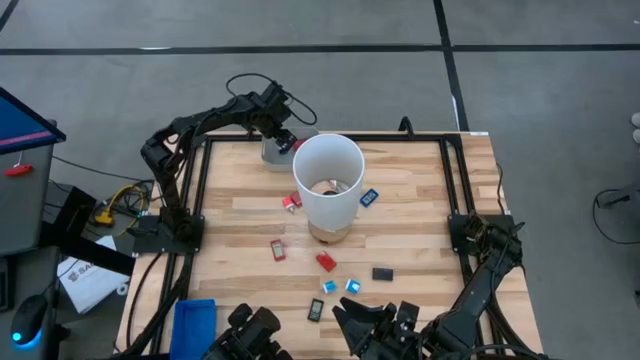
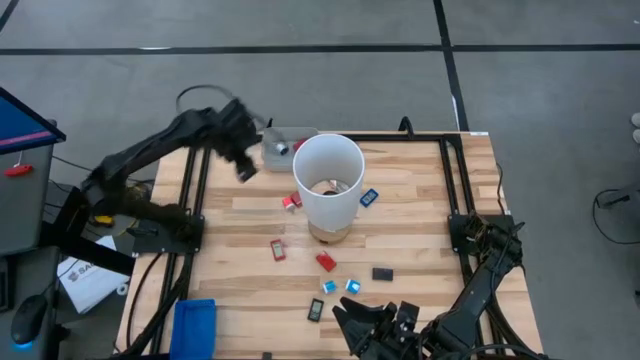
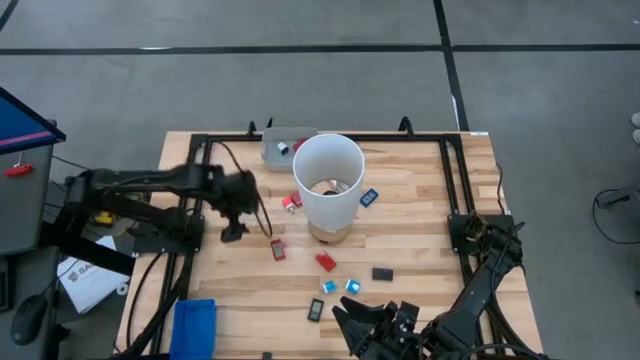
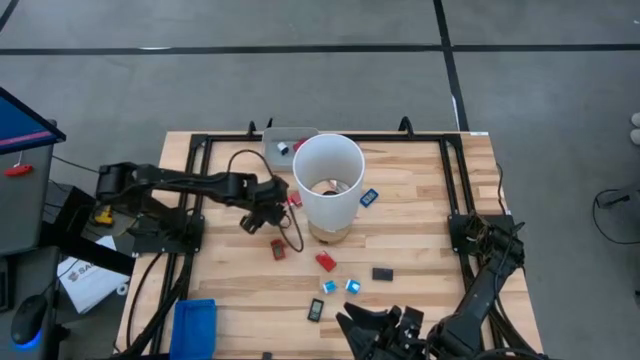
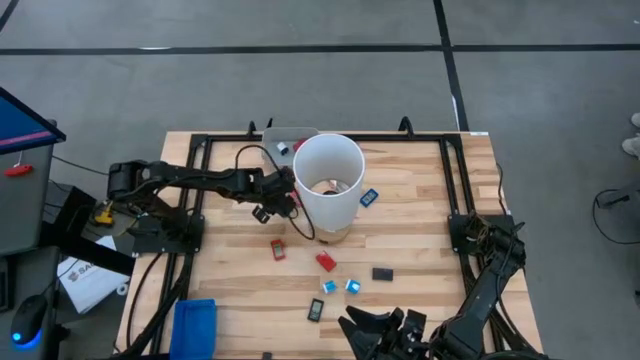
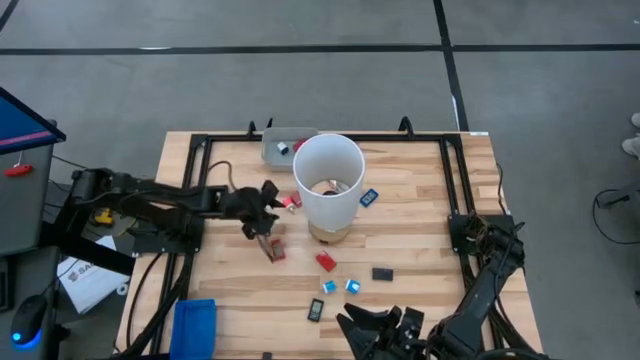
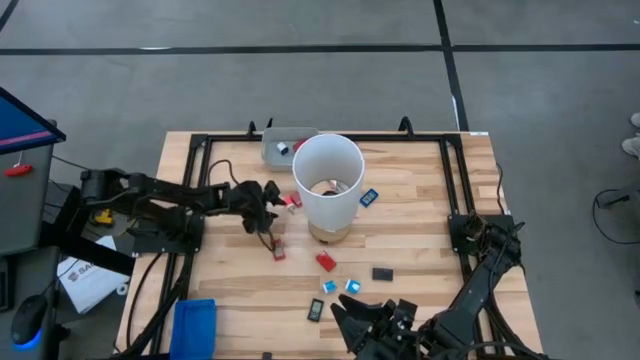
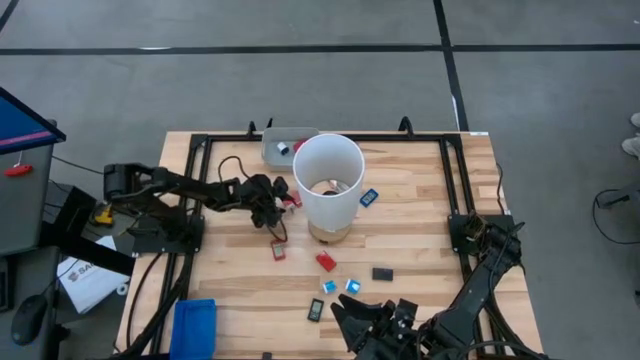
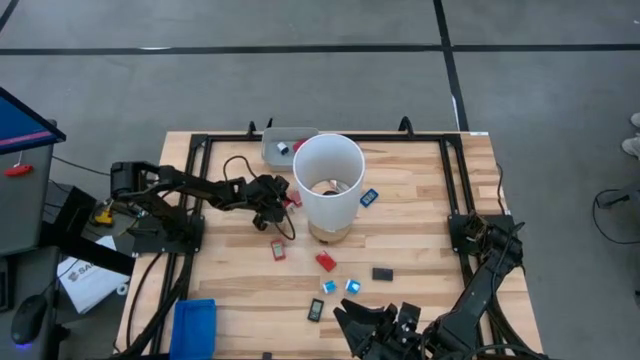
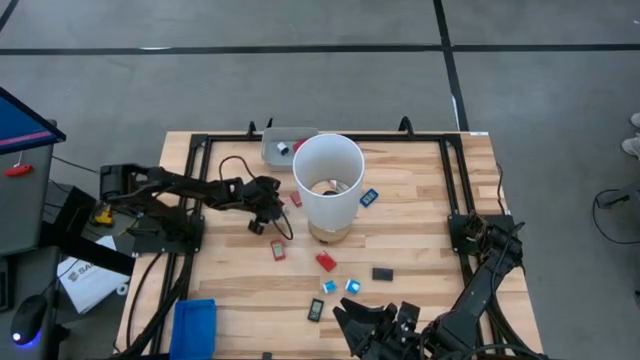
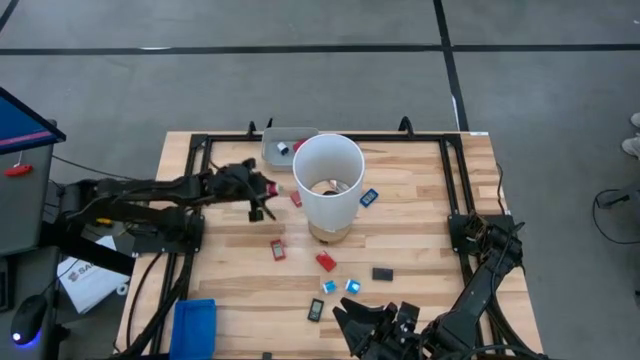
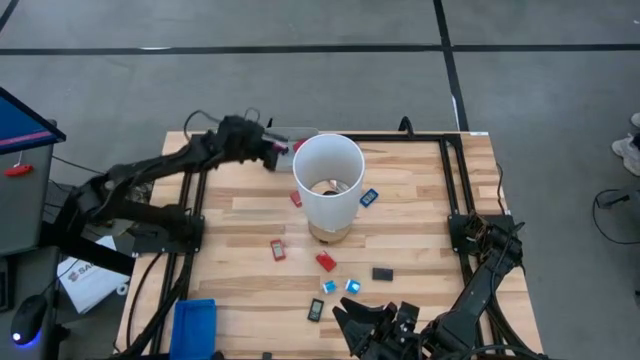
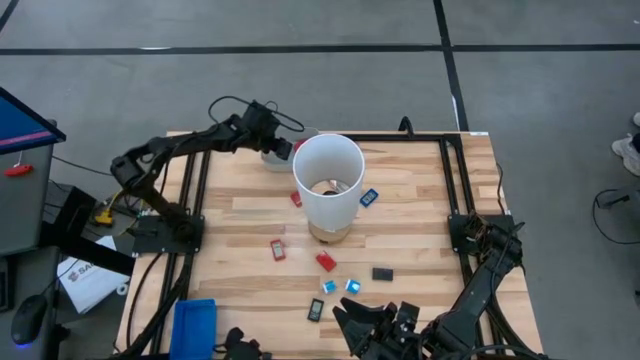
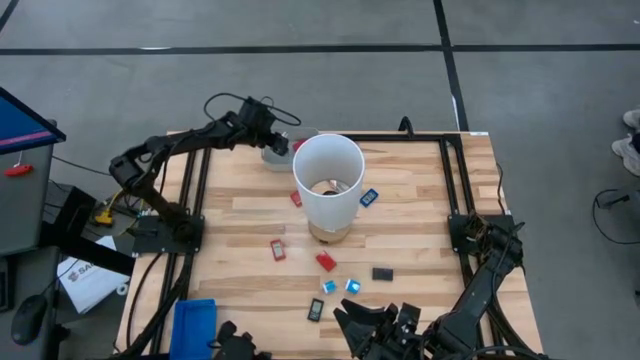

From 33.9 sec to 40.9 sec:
Task: Pick & Place Office items
Put the pink charger adapter into the gray bin

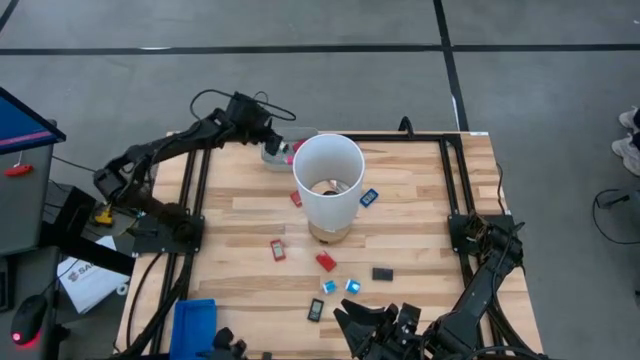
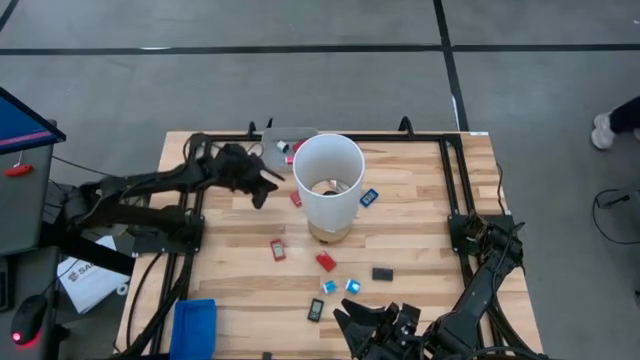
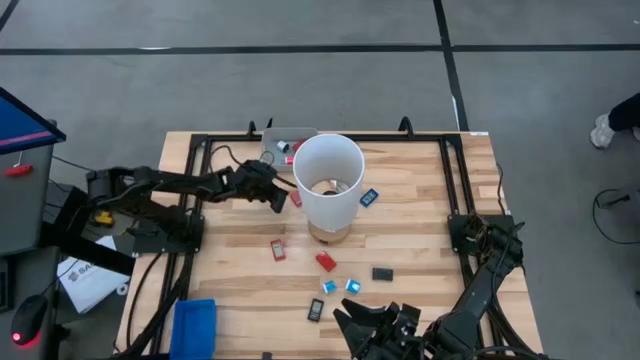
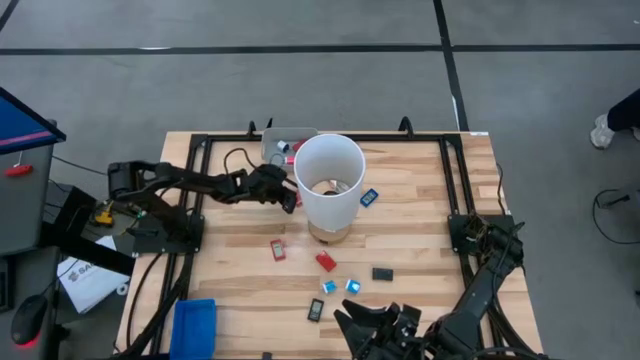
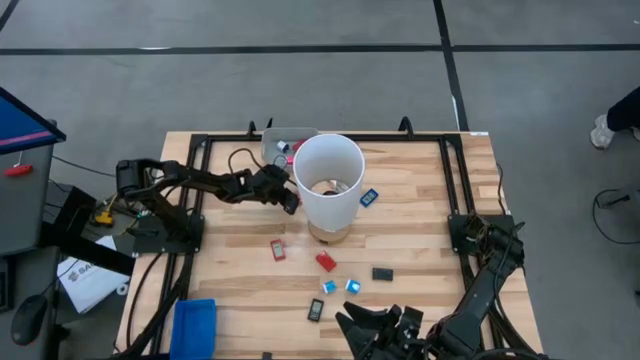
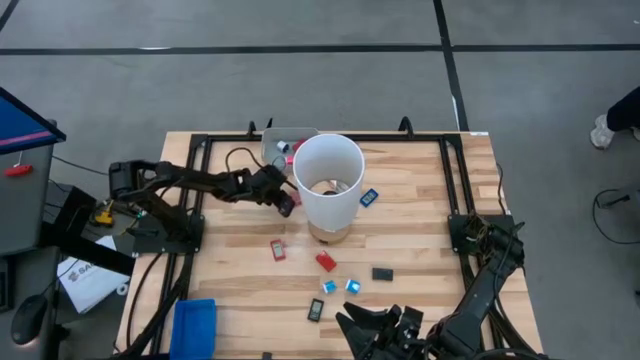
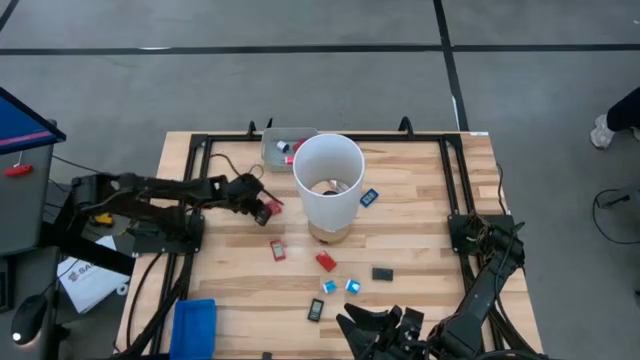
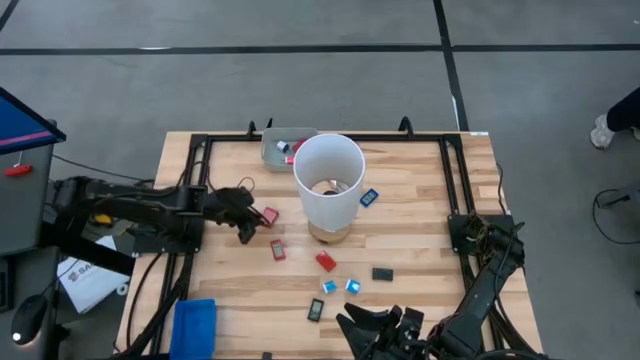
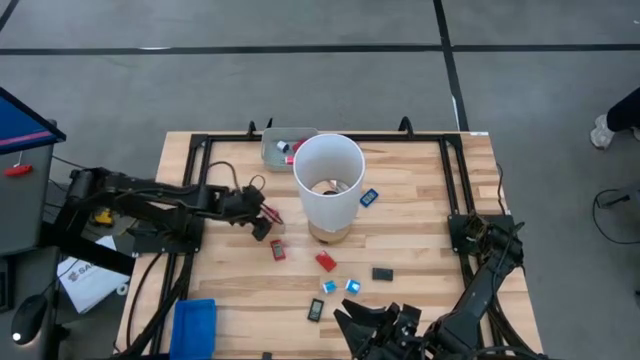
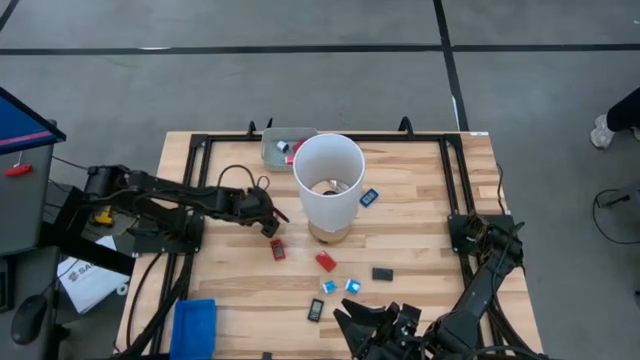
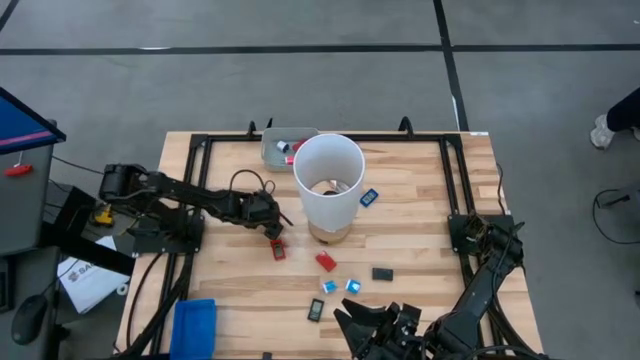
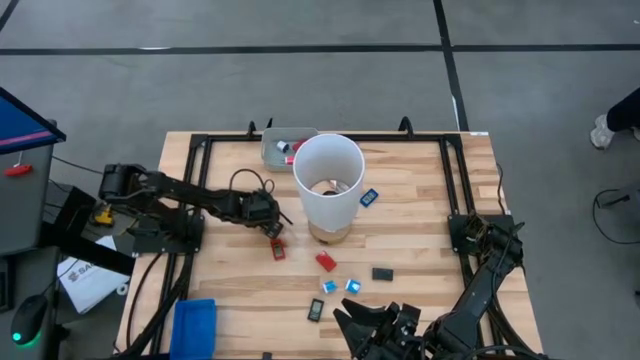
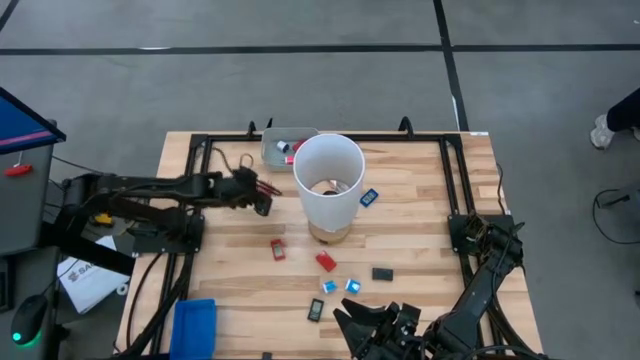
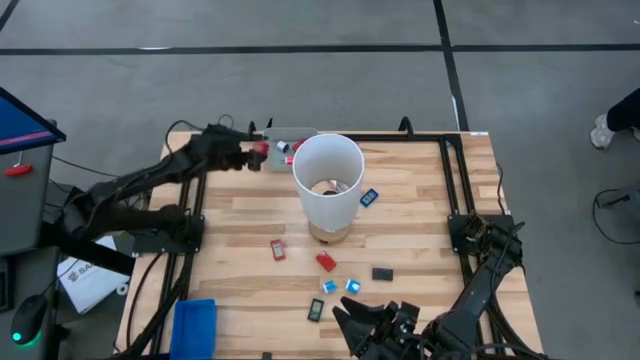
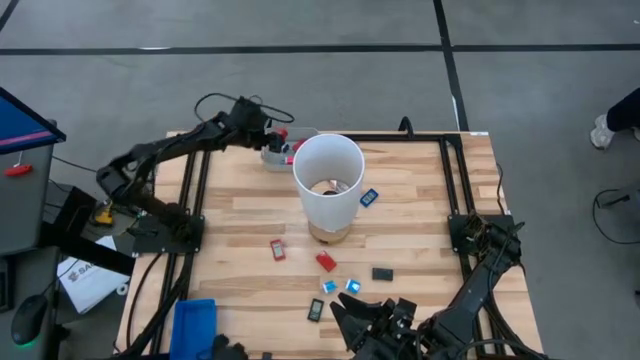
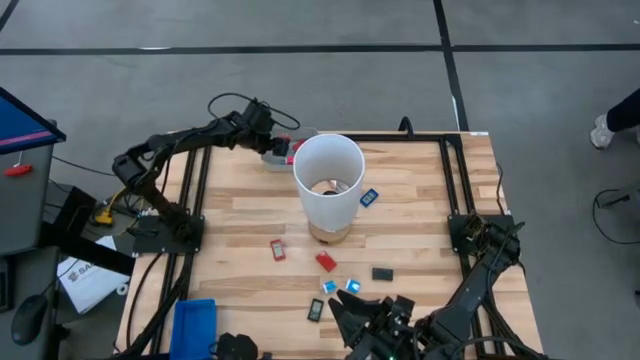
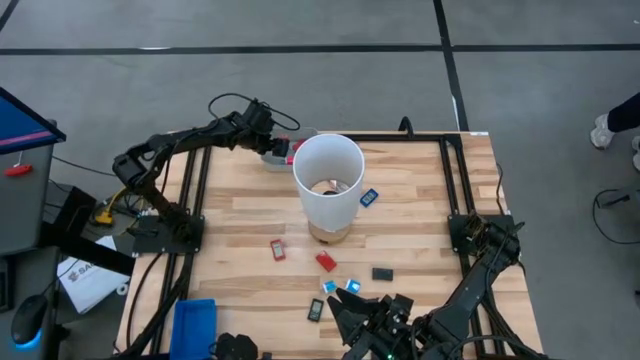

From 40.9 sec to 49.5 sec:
Put the red charger adapter into the gray bin

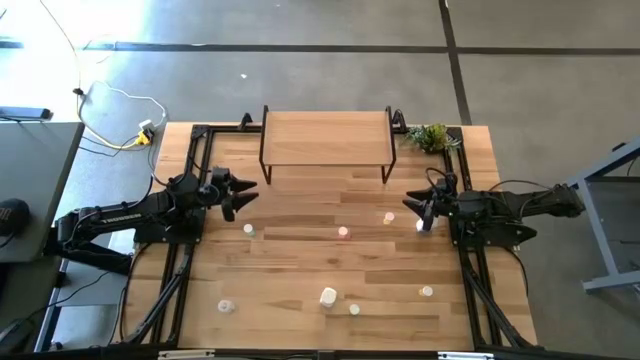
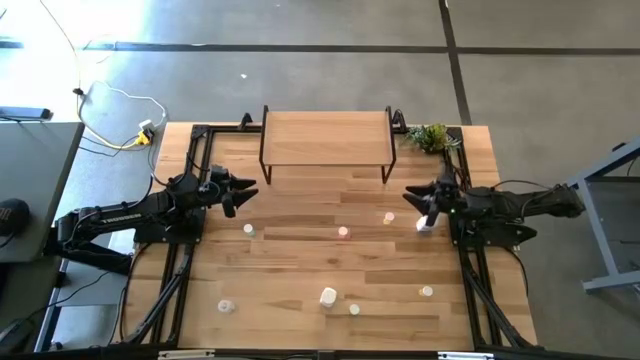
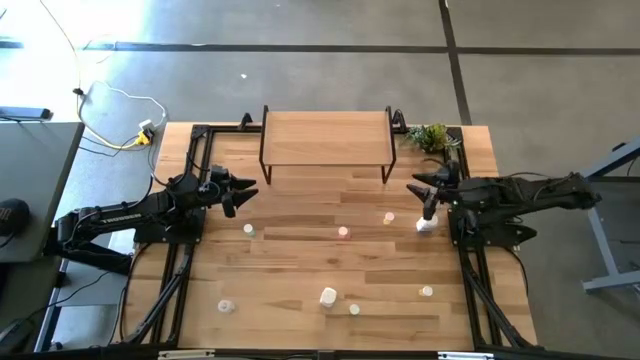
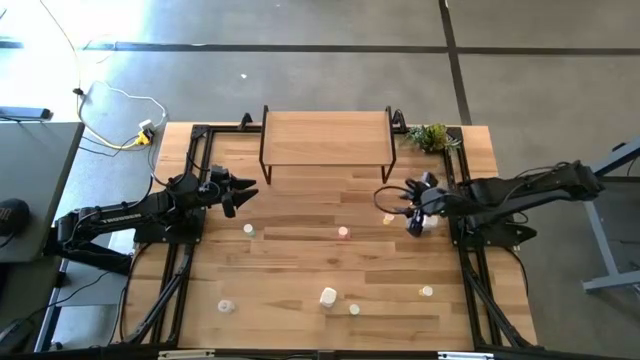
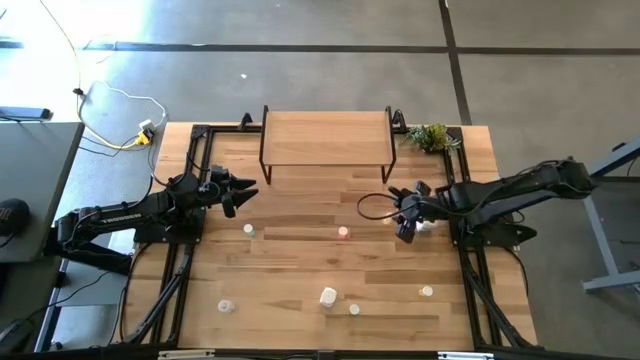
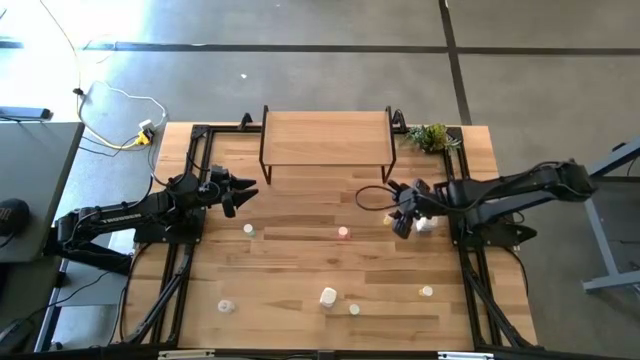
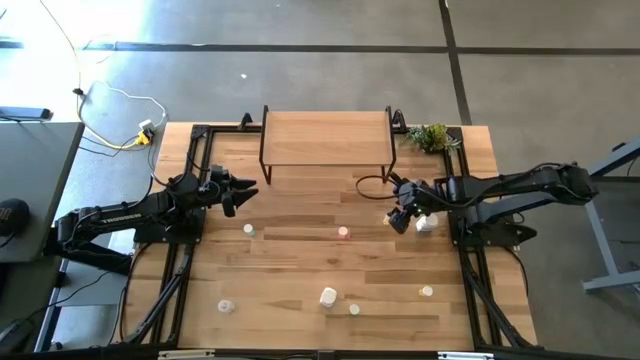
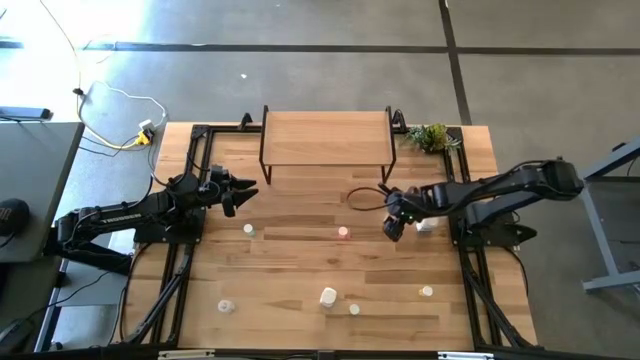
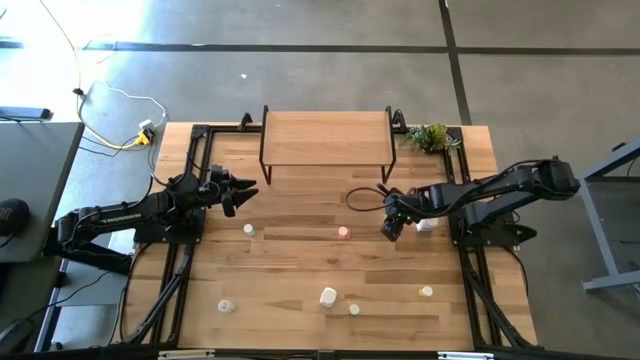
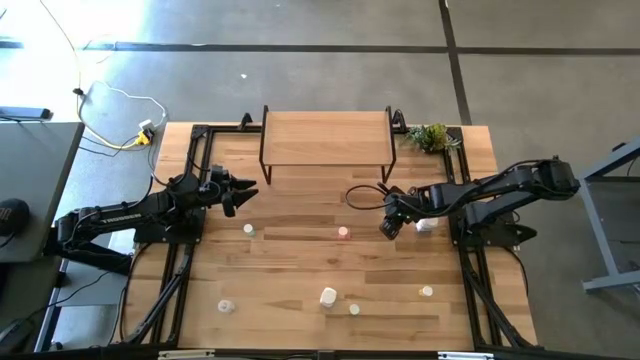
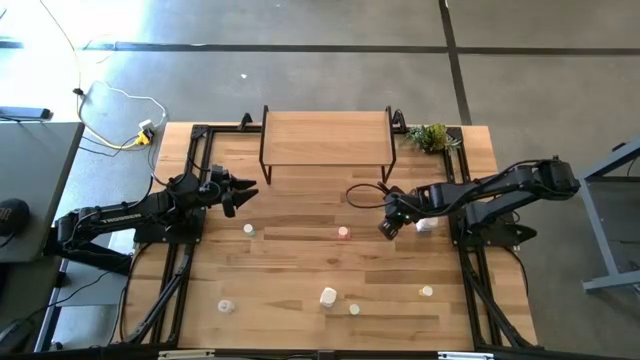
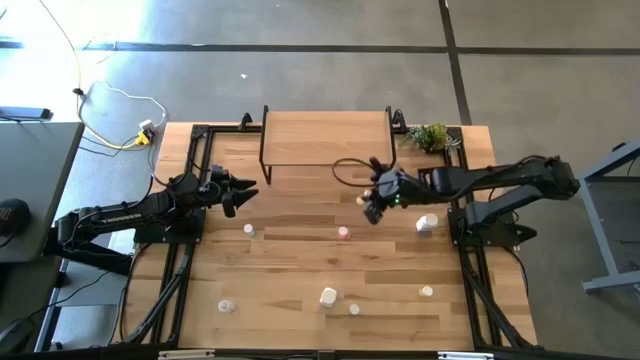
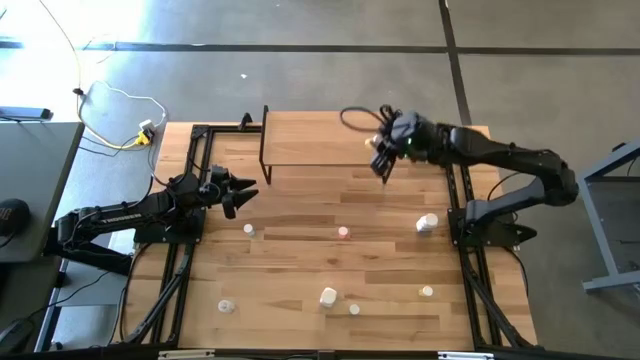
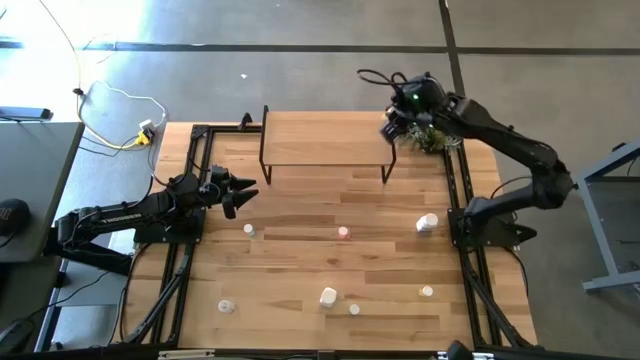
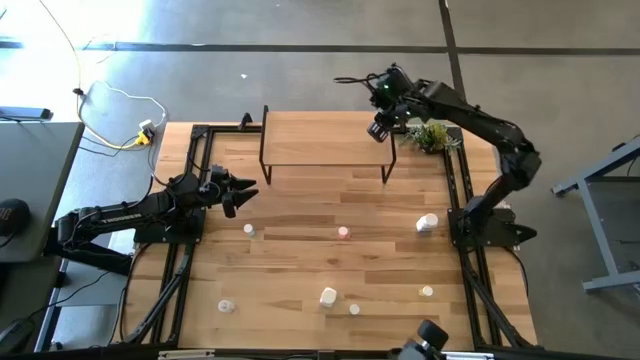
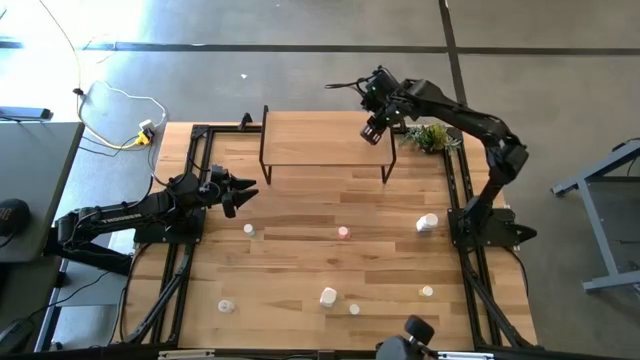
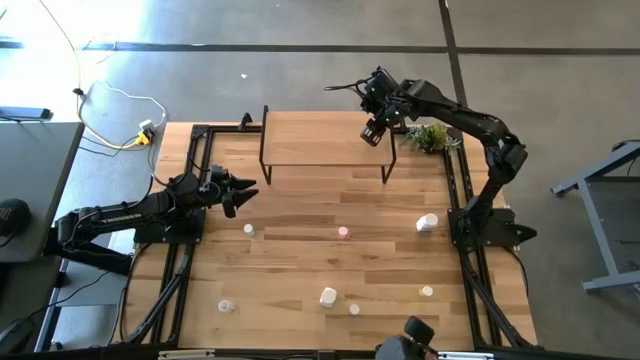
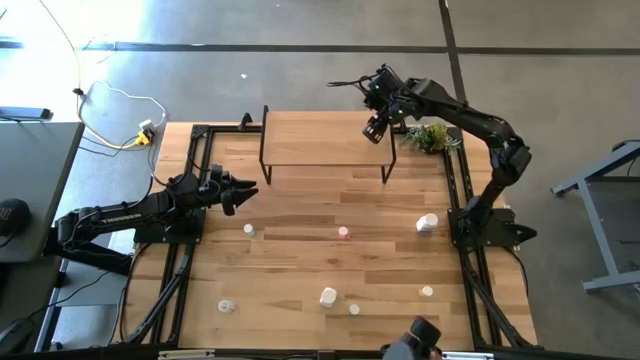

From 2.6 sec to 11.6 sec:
Task: Pick and place medicine bottles onto shelf by color
Put the top yellow pill bottle on the shelf
